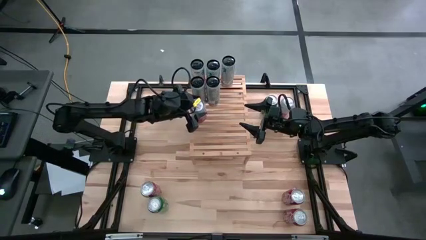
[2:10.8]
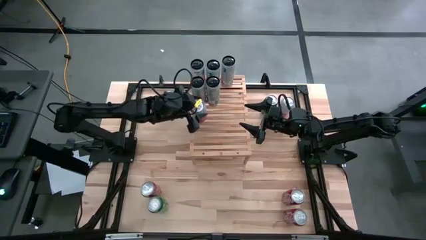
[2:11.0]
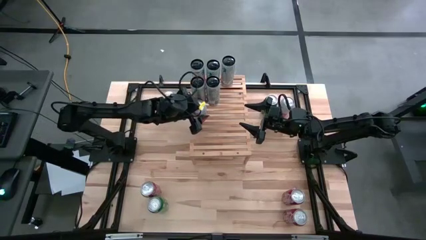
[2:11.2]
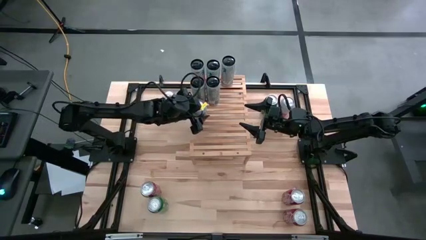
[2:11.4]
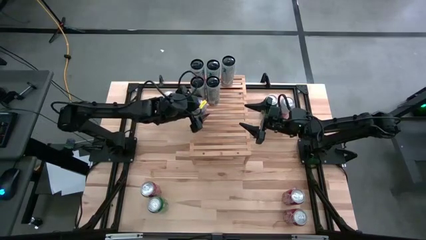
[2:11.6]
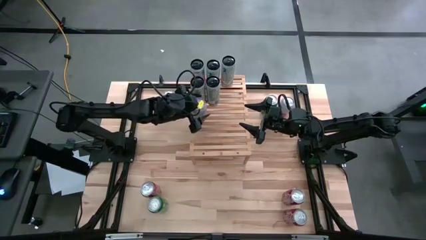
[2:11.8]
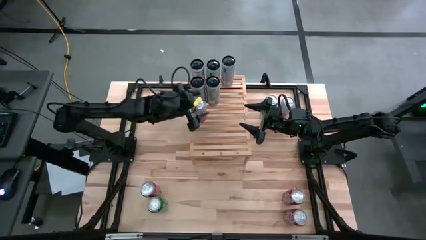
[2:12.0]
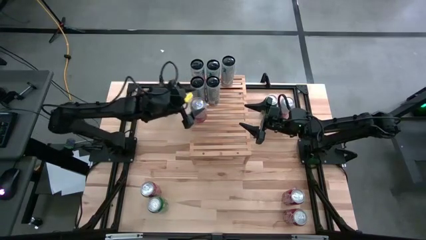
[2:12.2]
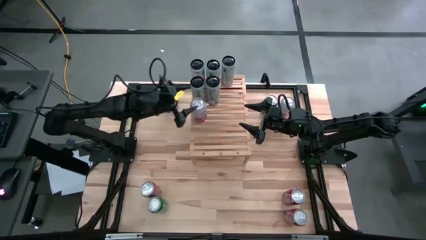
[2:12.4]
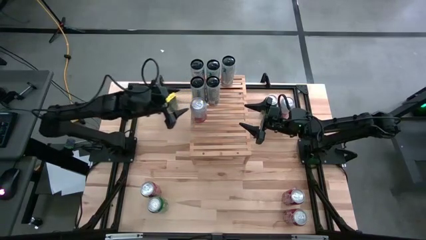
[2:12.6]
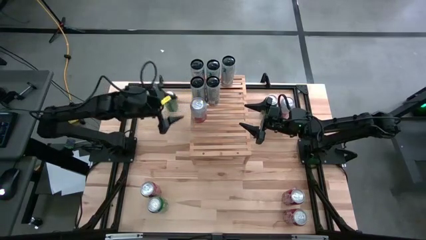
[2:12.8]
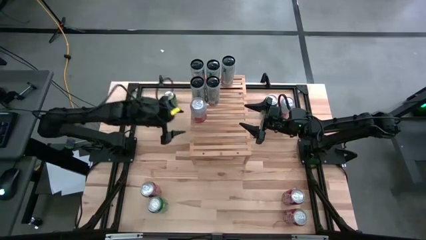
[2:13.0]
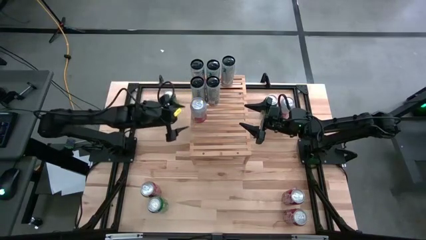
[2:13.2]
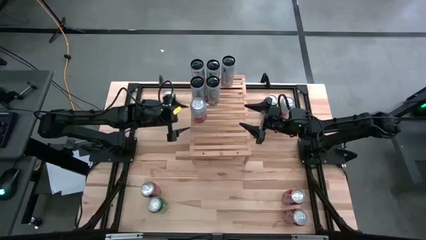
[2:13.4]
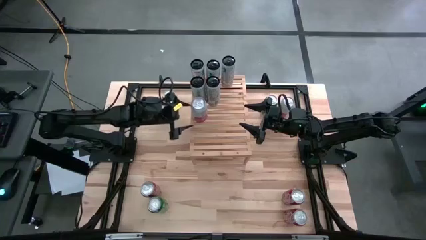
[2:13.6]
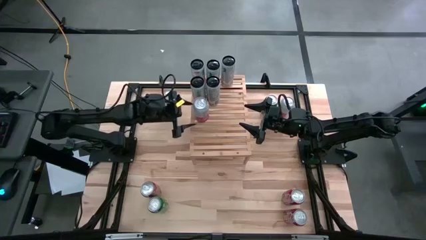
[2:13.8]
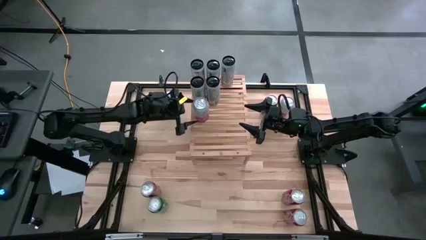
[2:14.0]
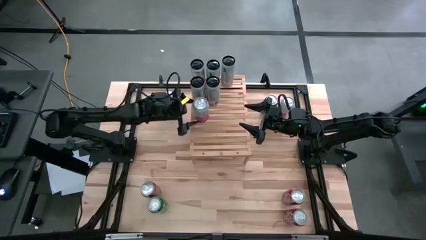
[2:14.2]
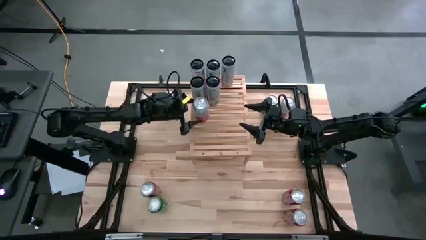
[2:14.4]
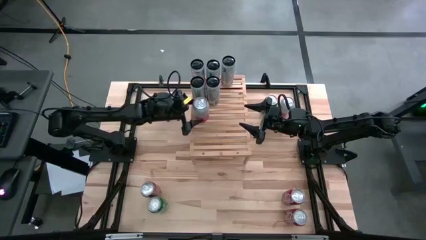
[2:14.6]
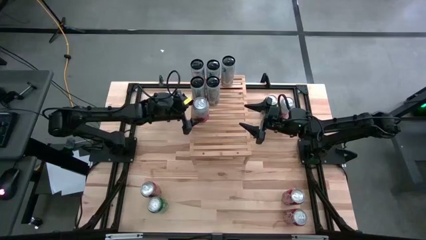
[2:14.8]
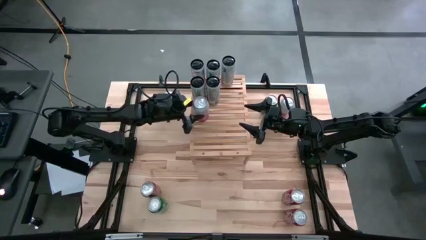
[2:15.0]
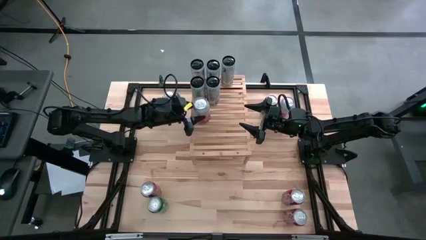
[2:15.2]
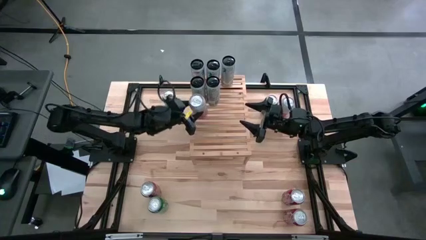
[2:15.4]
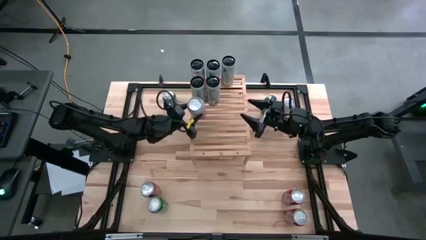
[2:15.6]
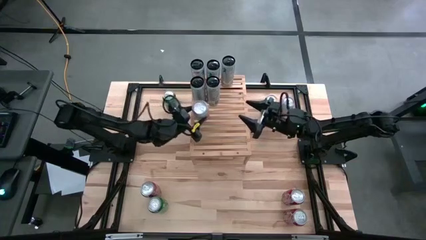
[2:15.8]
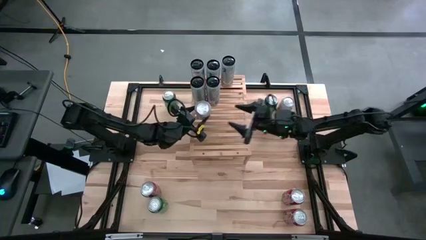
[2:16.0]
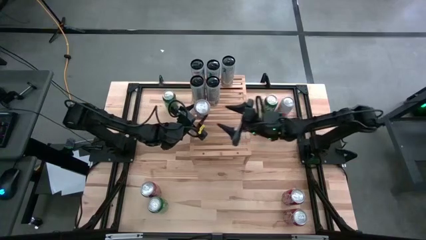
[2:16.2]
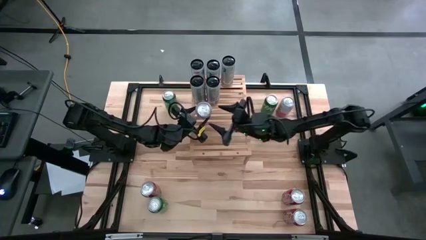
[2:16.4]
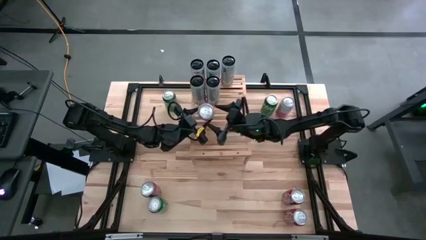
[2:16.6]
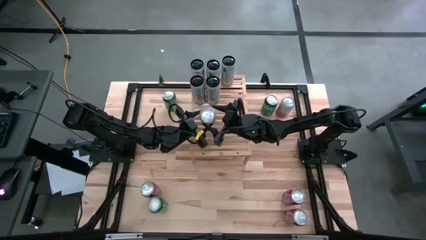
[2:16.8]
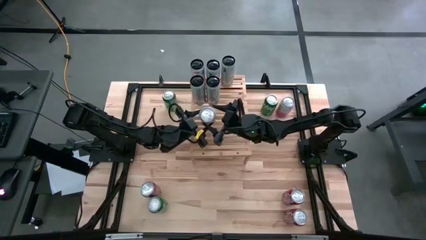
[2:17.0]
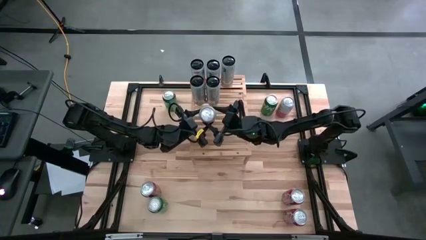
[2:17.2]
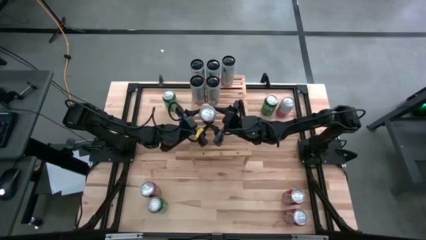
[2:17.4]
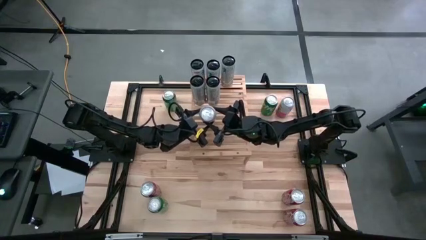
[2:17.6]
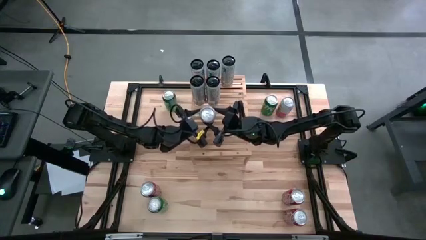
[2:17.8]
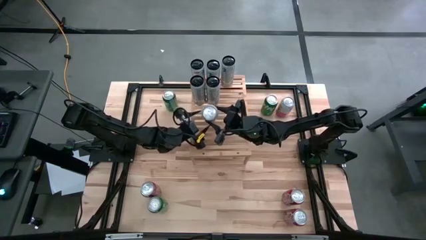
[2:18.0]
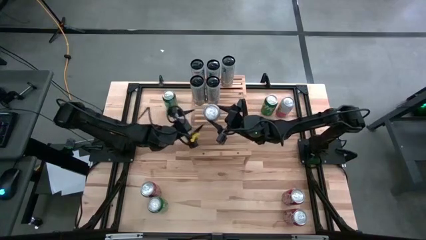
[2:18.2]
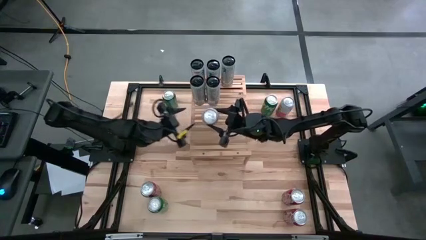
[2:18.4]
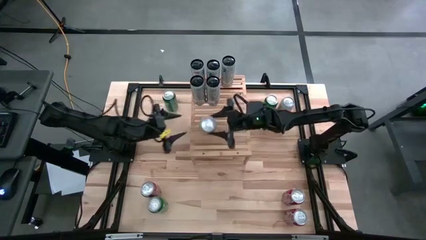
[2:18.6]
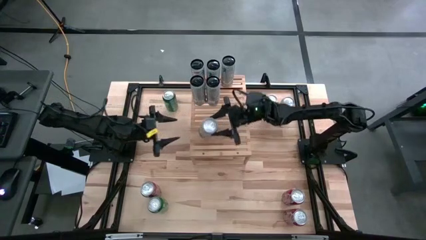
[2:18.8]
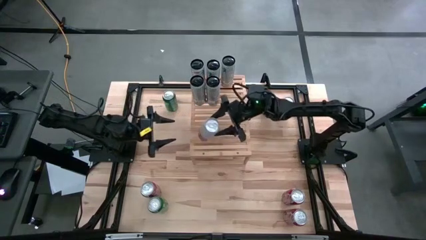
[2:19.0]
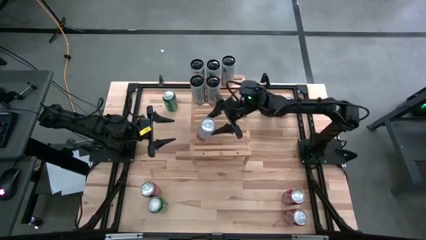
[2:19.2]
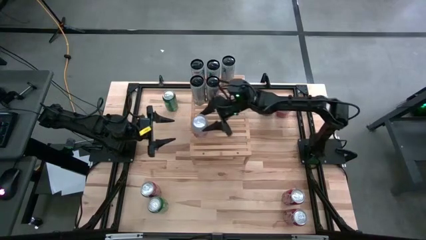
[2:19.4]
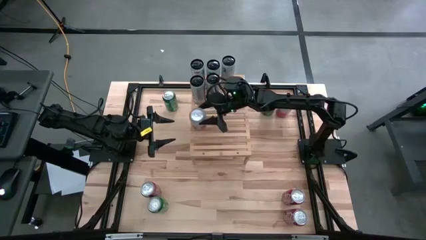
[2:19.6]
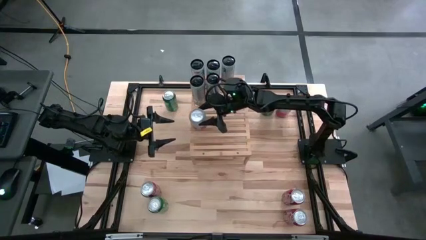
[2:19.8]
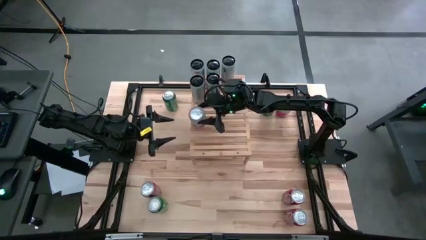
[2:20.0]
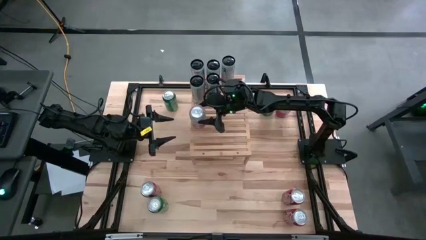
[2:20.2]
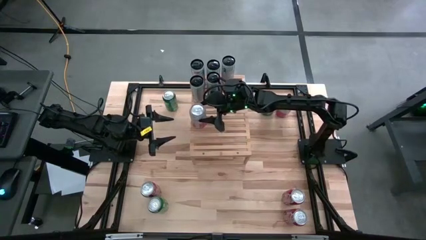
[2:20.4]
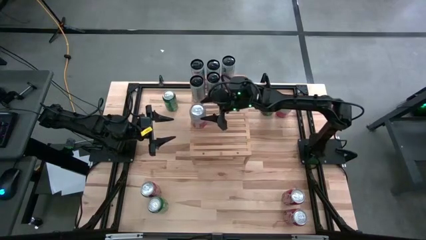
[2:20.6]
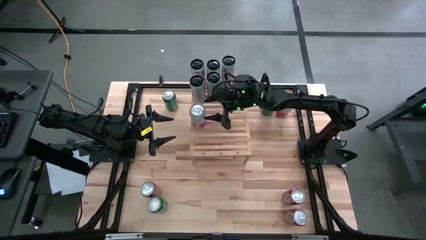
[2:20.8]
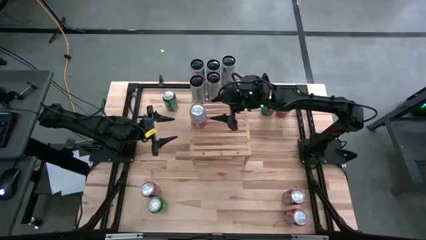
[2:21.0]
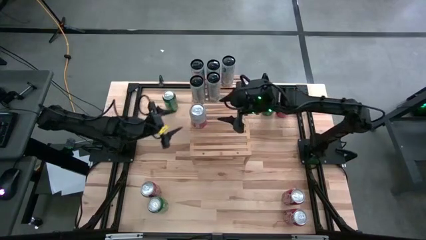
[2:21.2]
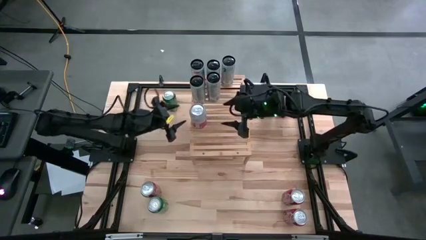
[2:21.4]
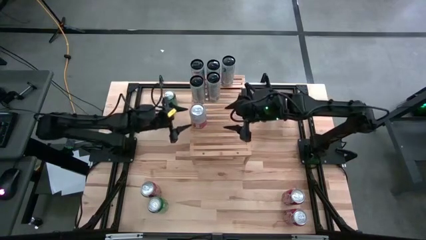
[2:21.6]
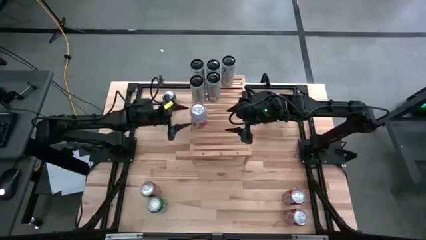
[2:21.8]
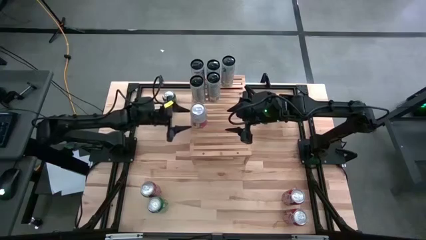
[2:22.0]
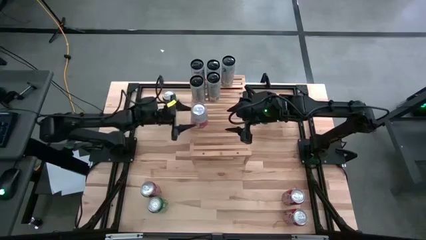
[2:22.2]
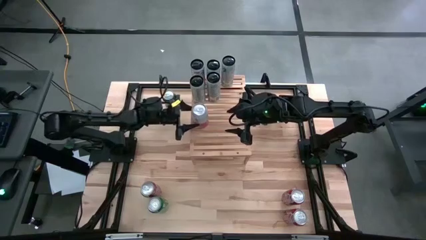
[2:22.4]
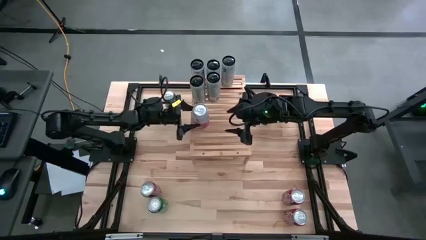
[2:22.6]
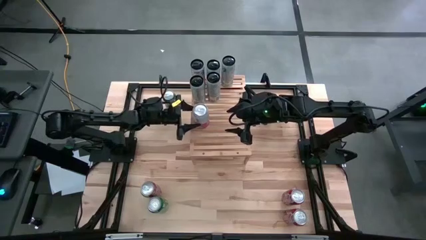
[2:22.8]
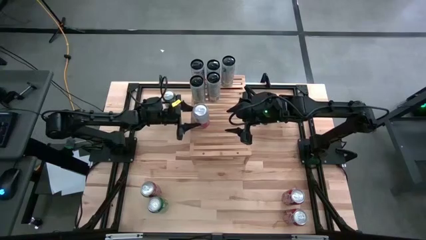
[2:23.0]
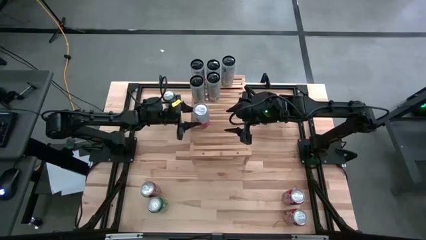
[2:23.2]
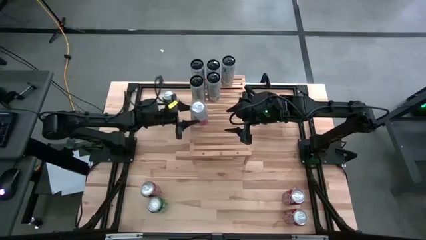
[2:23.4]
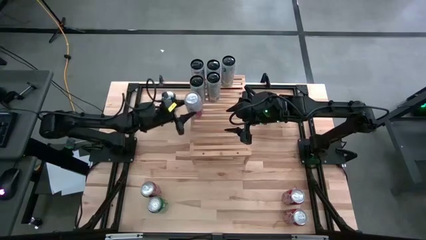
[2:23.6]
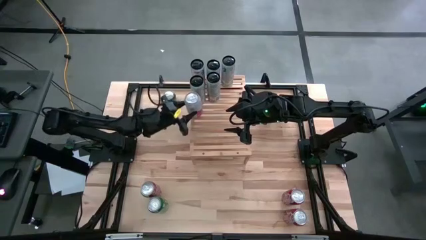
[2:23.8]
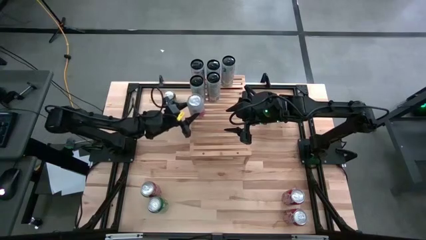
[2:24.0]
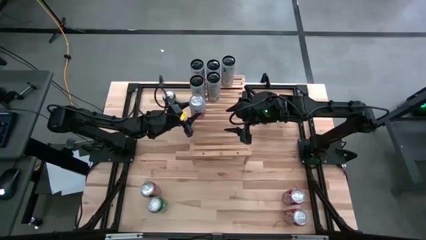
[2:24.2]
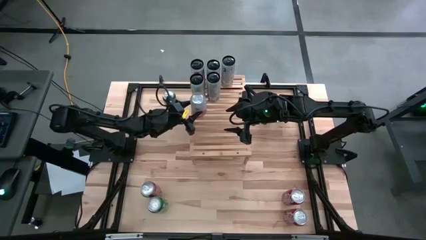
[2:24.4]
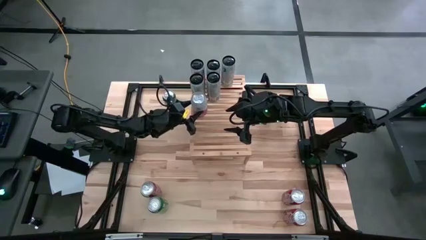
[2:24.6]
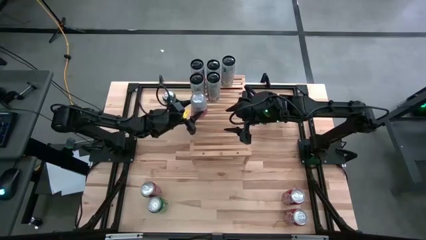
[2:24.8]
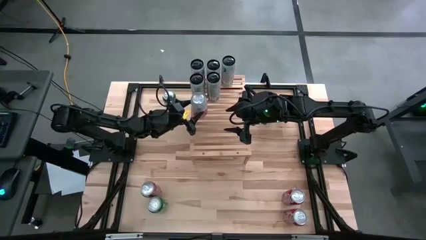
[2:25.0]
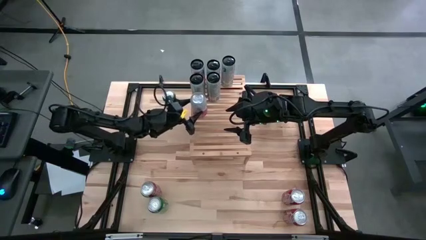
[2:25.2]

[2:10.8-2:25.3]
Task: Place canned beverage on shelf
Put the left white and pink soda can on the shelf

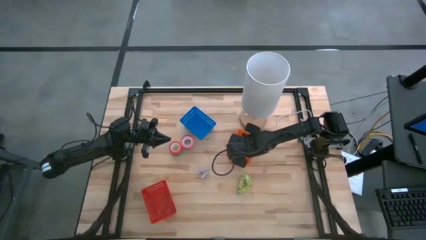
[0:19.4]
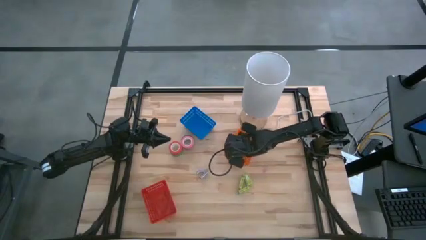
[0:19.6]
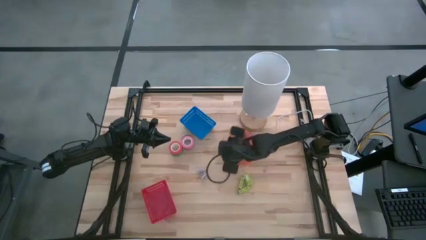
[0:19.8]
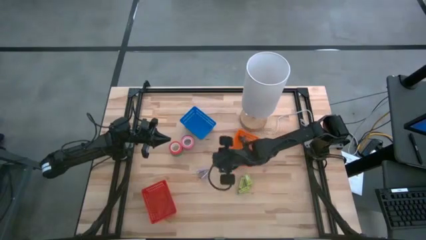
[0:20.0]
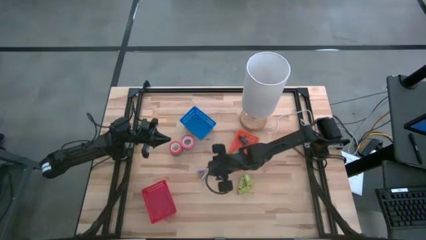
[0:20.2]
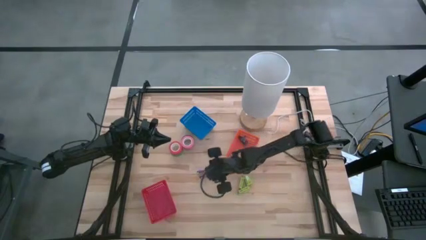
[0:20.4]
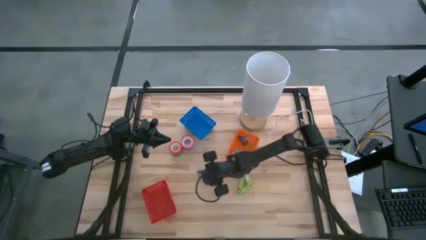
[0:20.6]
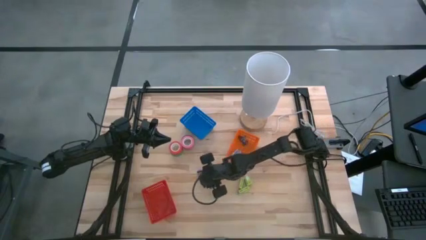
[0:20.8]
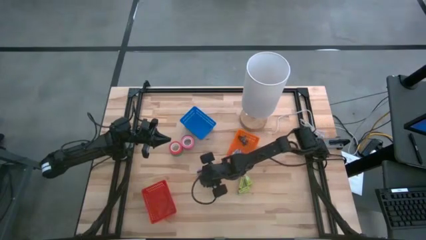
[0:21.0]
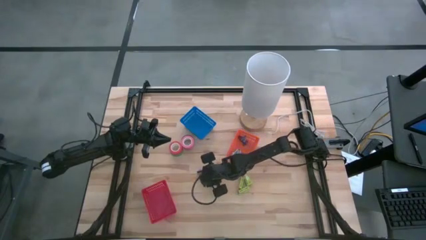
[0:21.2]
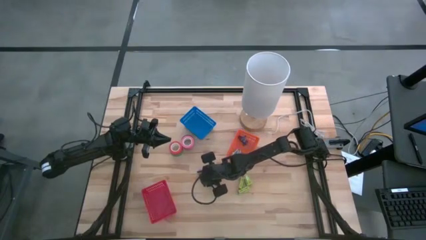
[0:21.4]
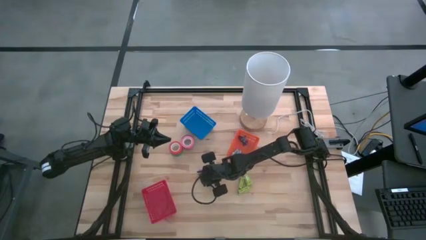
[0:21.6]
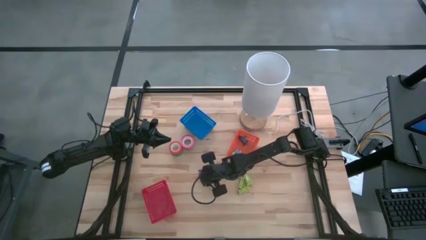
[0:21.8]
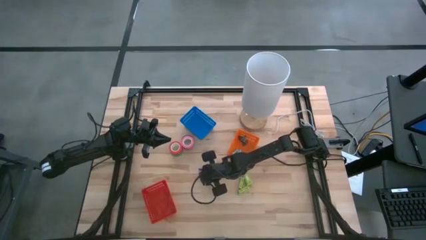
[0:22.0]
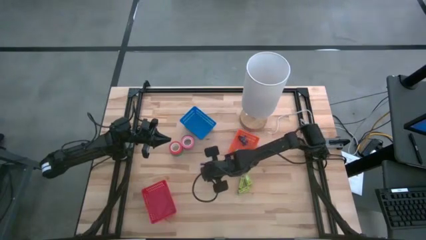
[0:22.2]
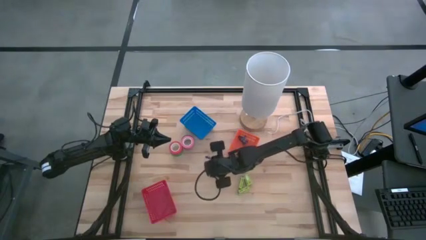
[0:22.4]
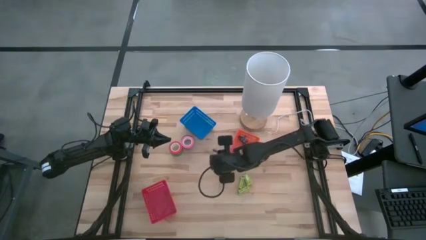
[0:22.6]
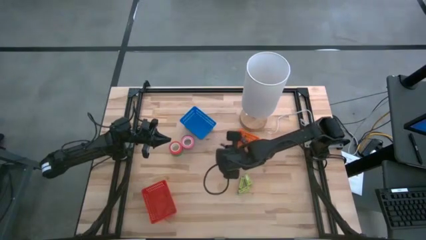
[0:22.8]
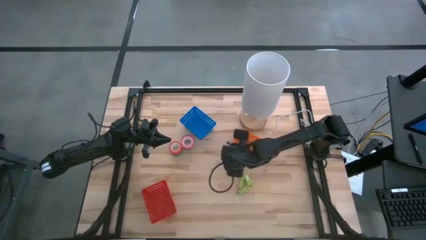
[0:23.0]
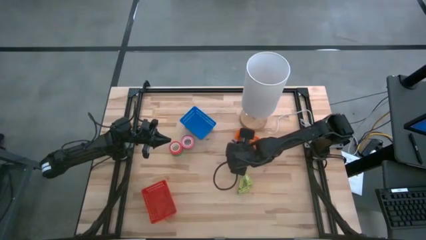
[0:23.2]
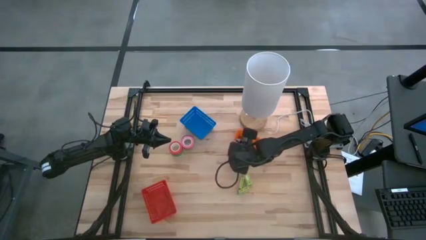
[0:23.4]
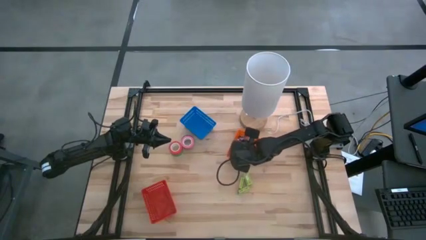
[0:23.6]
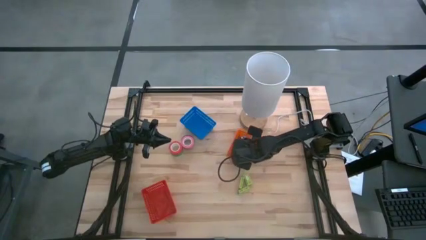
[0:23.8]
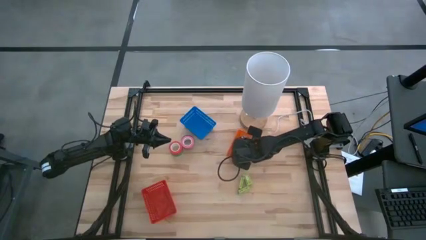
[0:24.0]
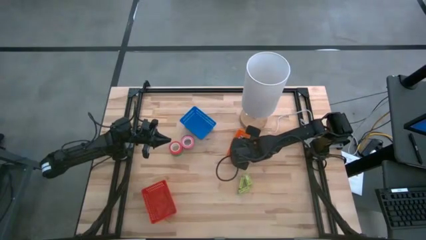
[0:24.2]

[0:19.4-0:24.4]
Task: Pick and place Stapler, Stapler remover, tape
Put the purple staple remover into the orange basket
